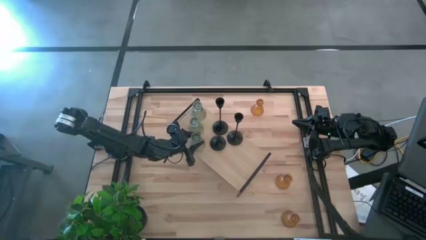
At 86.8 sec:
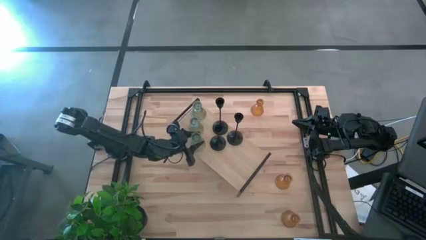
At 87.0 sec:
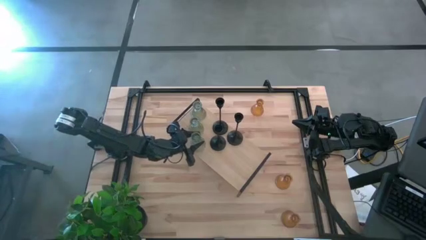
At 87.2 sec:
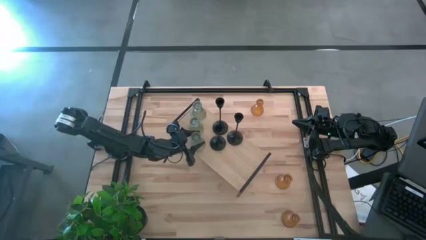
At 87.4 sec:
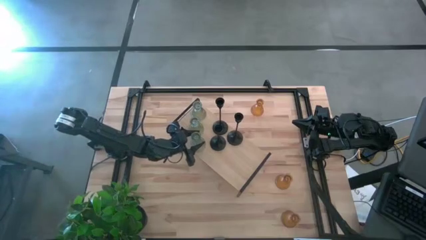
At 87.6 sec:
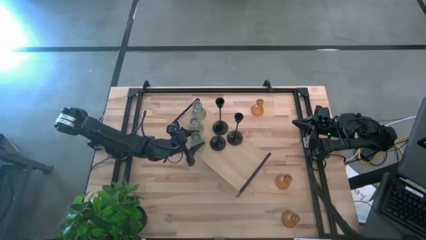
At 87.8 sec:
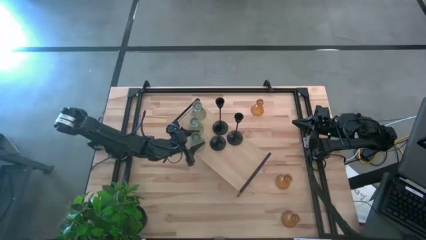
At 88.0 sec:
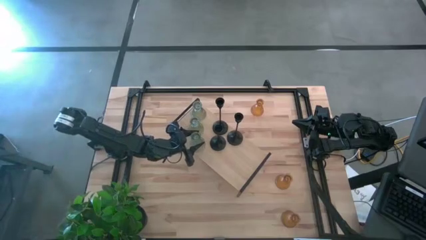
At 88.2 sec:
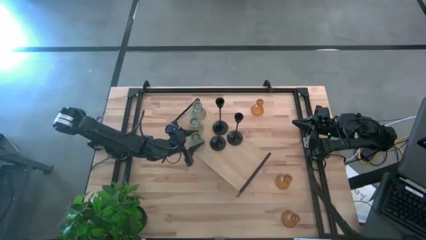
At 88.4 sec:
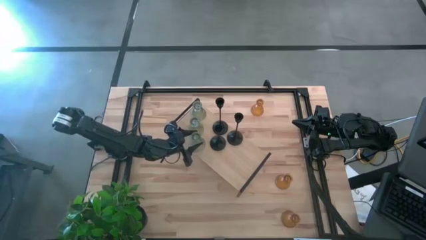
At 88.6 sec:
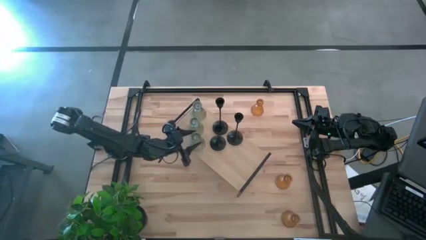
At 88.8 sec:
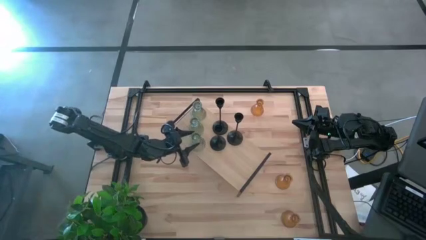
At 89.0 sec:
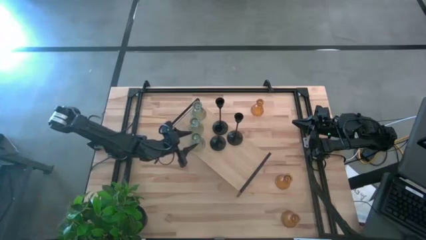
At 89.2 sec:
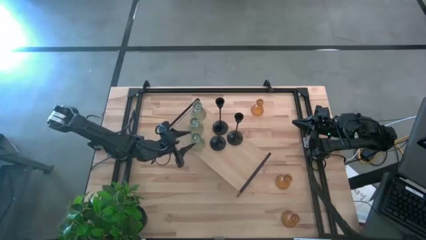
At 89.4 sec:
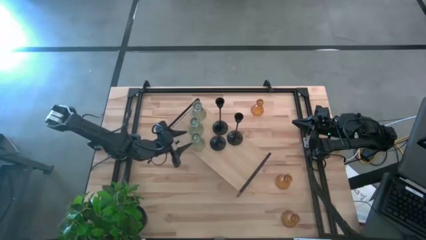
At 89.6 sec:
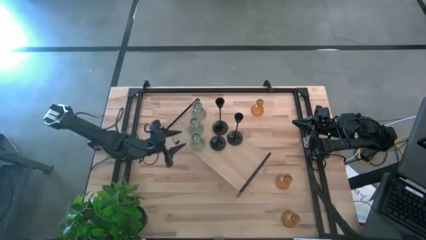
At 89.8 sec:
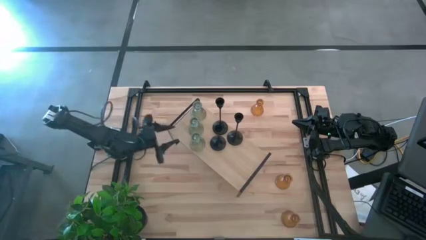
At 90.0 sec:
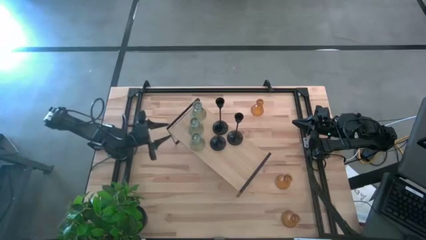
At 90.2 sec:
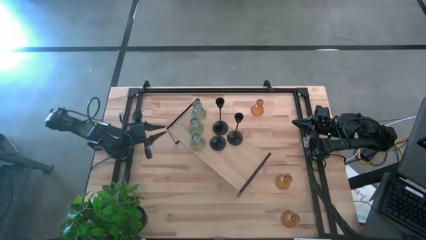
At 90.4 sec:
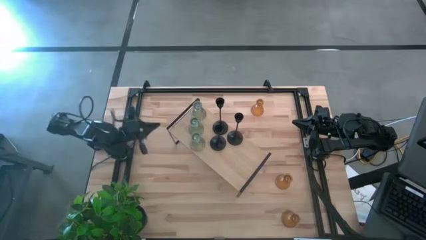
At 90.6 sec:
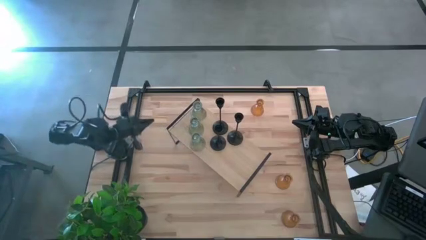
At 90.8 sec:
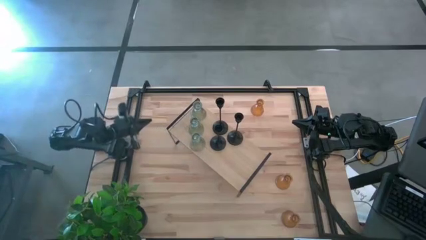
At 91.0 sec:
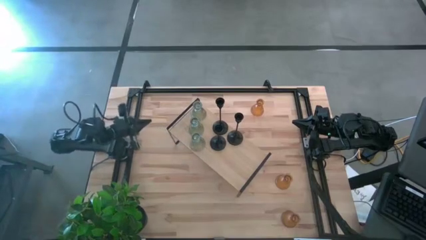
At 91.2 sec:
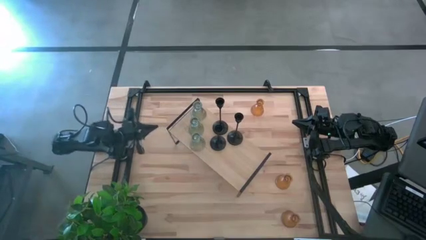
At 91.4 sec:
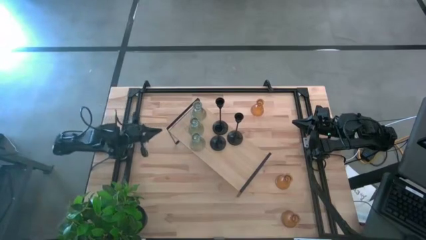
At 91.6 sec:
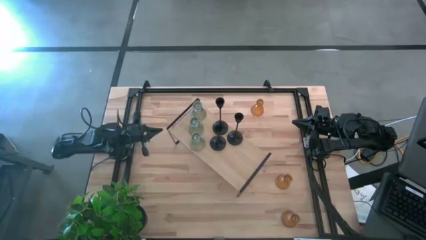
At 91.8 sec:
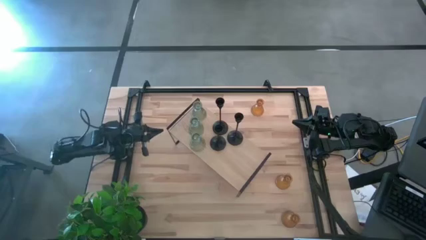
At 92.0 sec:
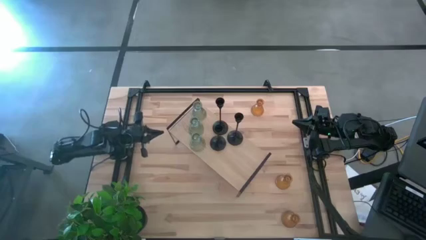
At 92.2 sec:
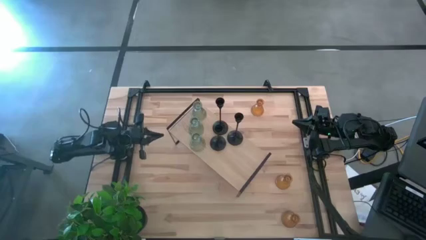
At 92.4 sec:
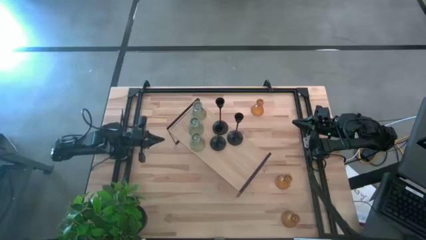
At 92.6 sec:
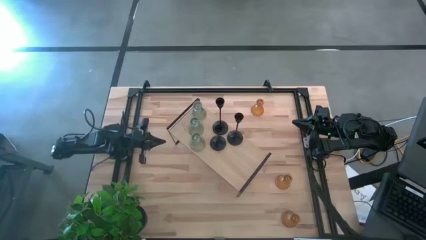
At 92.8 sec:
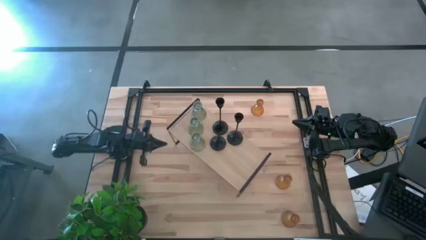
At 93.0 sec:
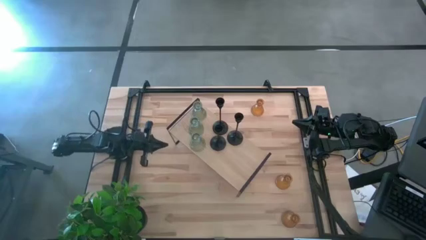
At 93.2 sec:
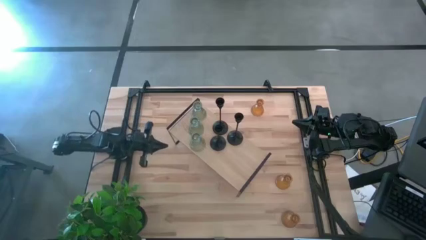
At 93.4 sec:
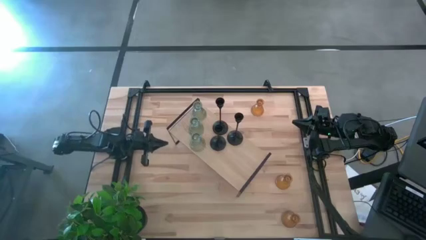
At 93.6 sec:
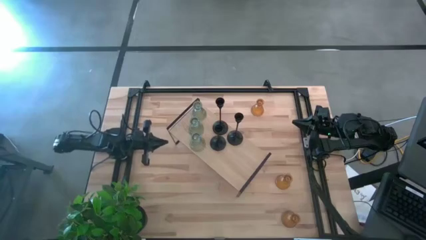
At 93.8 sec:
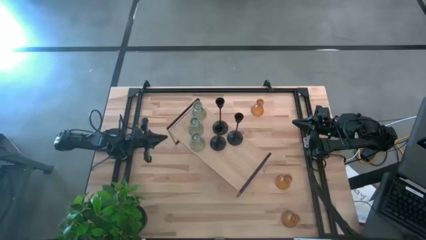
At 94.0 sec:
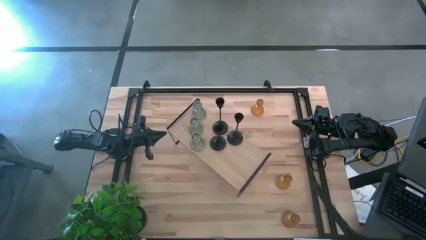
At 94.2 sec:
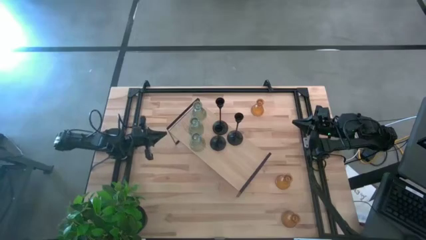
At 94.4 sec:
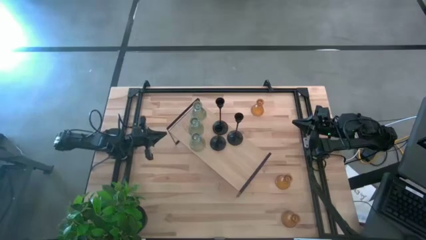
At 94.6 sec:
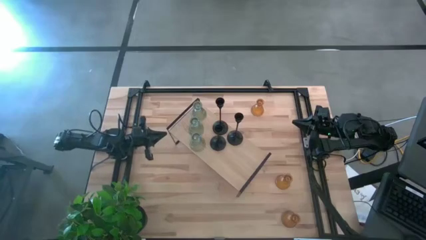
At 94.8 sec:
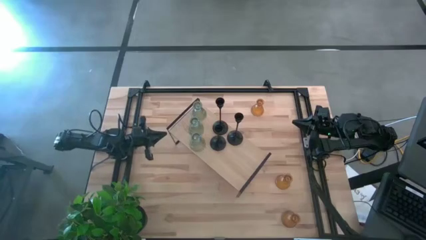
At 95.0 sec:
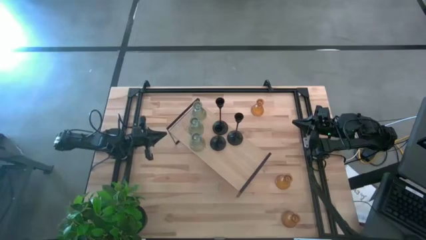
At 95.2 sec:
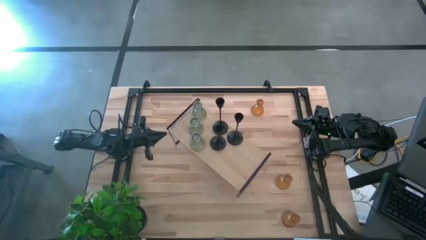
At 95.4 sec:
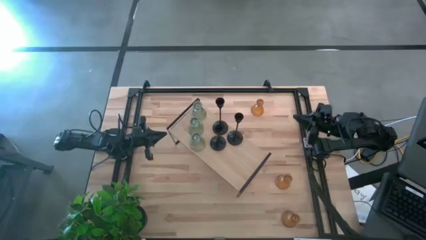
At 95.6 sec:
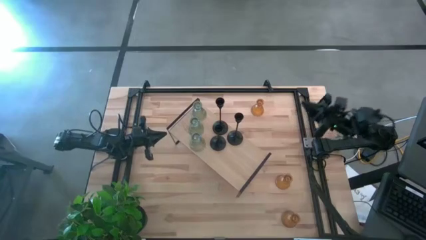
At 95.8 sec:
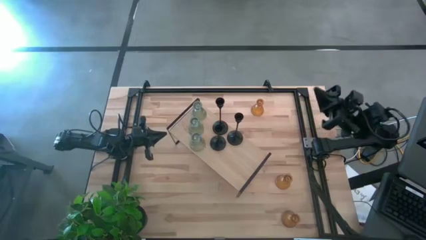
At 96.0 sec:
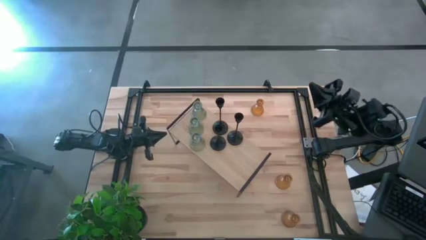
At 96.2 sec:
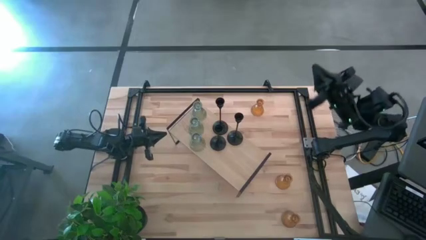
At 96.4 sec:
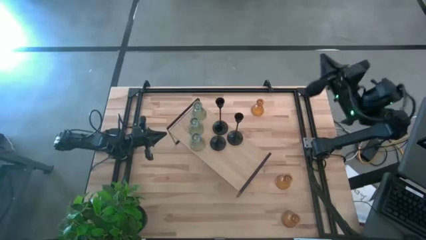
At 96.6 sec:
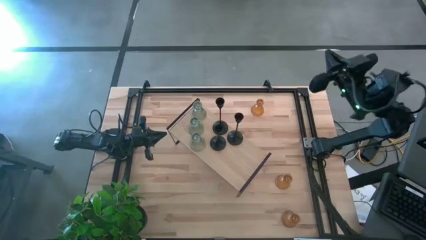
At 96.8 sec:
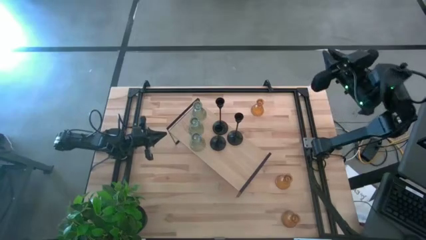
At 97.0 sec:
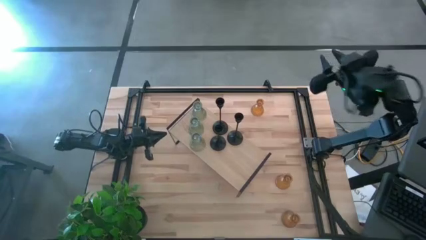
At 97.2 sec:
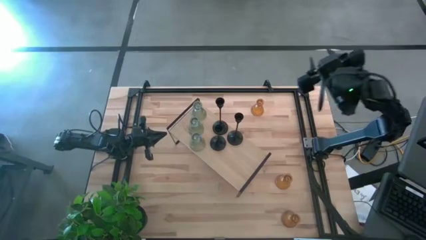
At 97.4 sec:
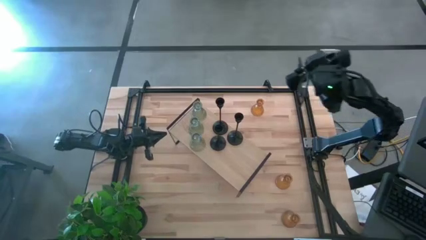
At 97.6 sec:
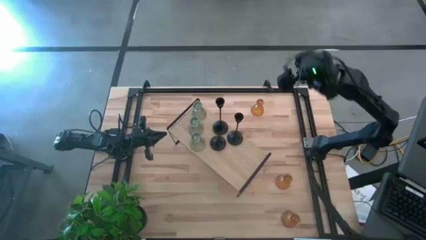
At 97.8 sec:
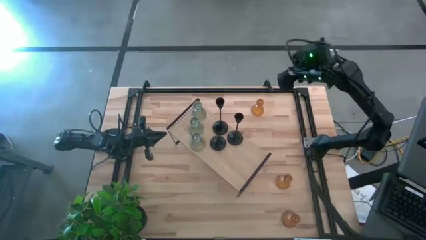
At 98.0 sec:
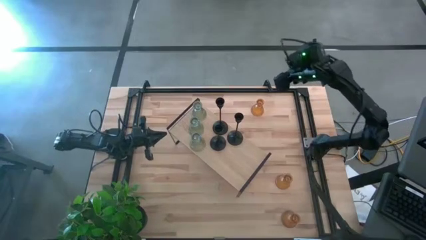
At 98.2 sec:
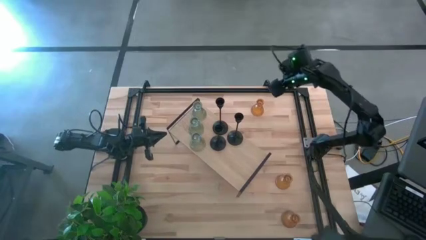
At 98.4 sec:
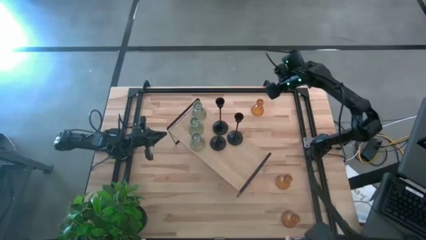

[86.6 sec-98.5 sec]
Task: Pick & Place candle stick holders
Put the top orange candle holder on the shelf

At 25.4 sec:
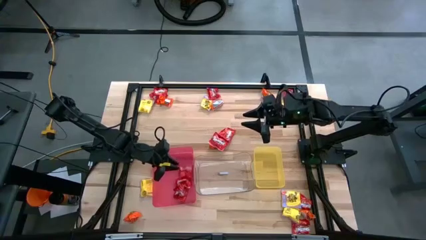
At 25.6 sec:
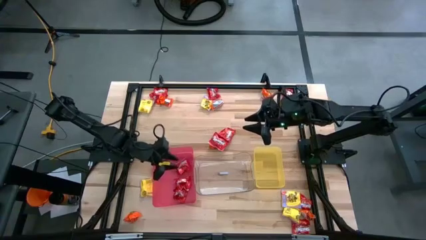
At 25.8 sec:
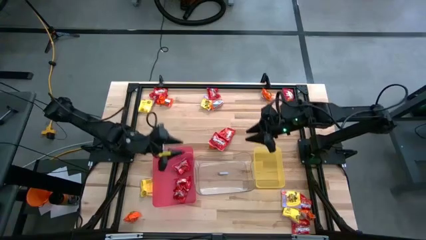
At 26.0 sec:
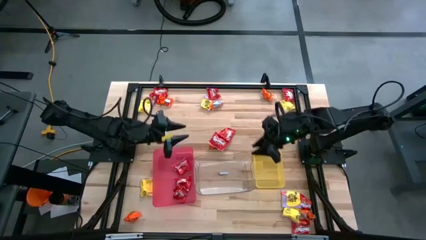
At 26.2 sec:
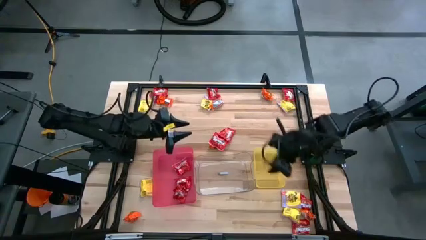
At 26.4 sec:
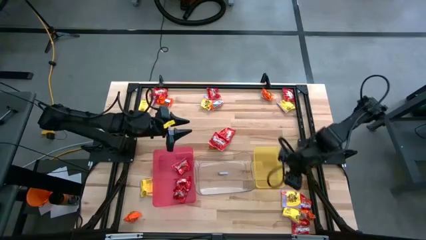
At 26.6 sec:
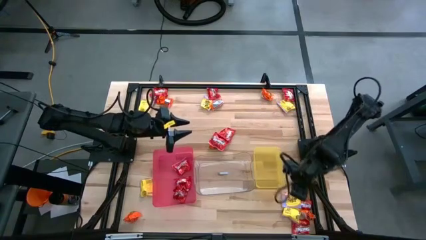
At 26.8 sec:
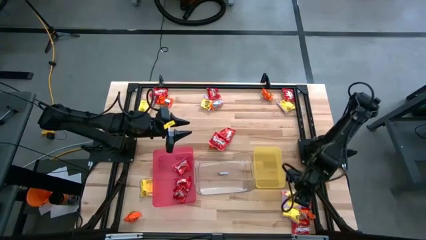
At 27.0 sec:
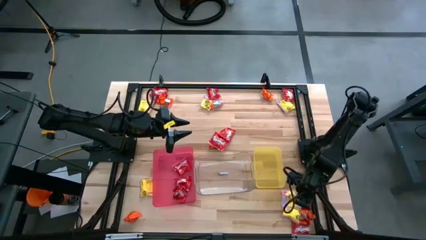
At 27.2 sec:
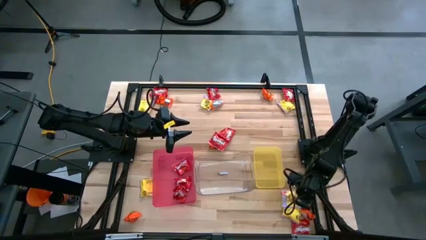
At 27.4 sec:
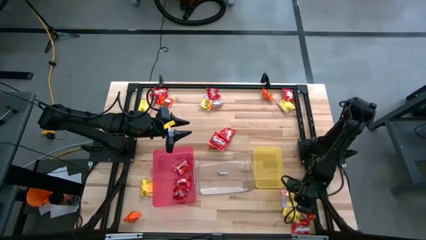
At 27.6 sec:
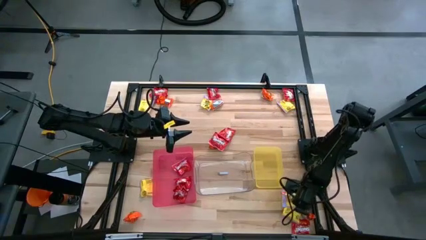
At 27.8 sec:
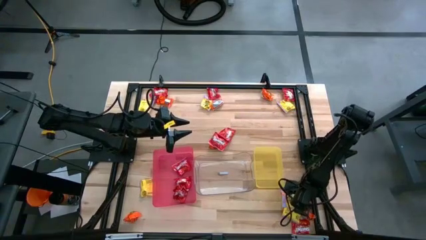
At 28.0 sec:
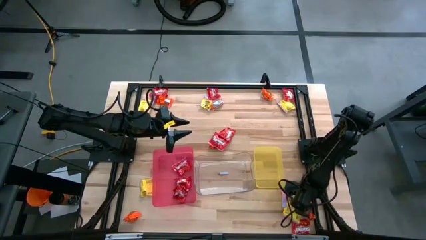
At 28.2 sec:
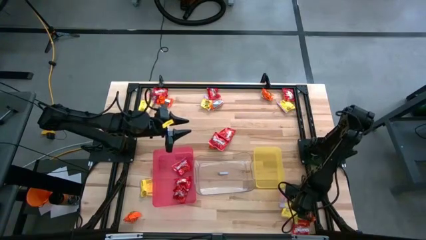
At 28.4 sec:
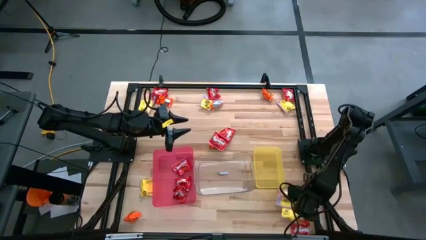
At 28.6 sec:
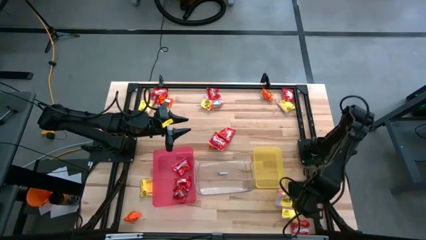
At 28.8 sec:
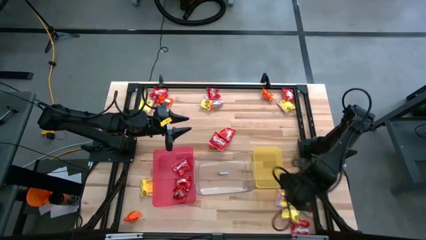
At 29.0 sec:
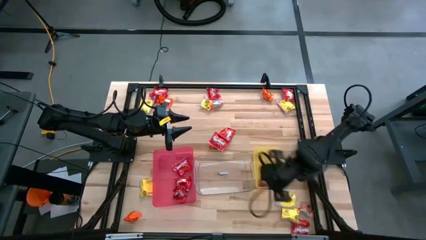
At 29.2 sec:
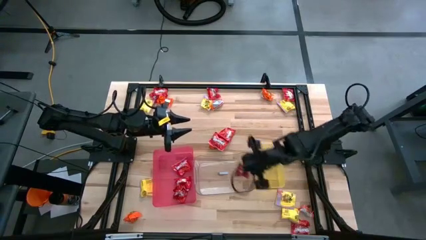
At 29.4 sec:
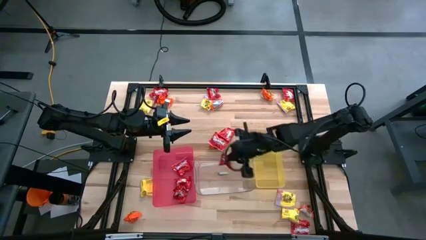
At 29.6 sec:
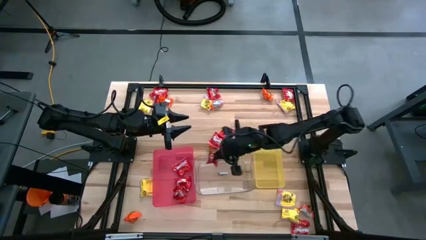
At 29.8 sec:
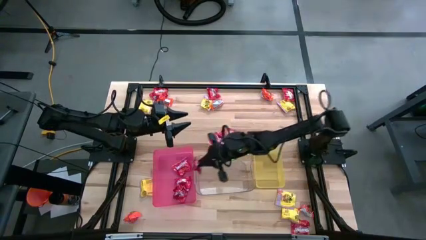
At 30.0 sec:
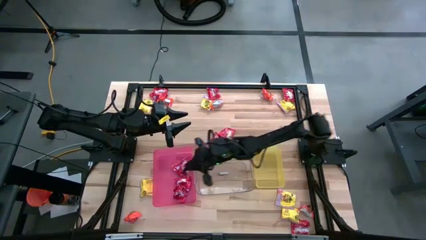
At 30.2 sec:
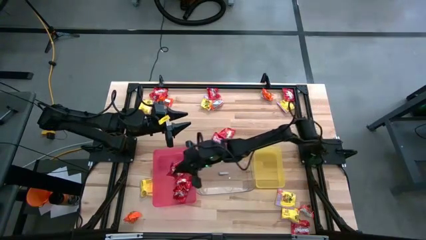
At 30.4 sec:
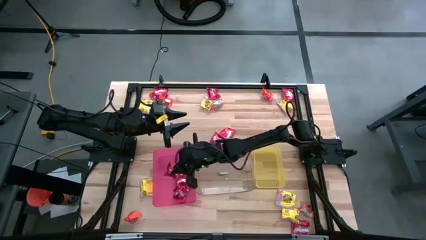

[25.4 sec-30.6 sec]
Task: Sort candy
Put the red candy into the red bin
